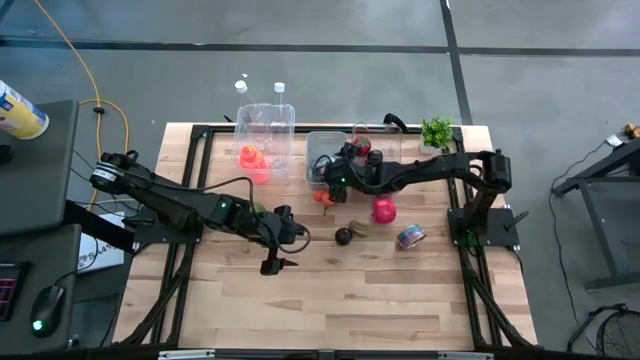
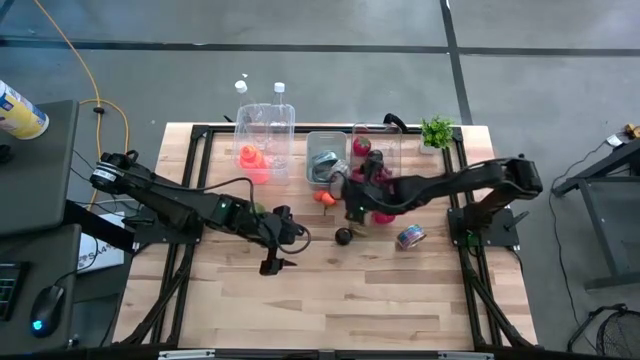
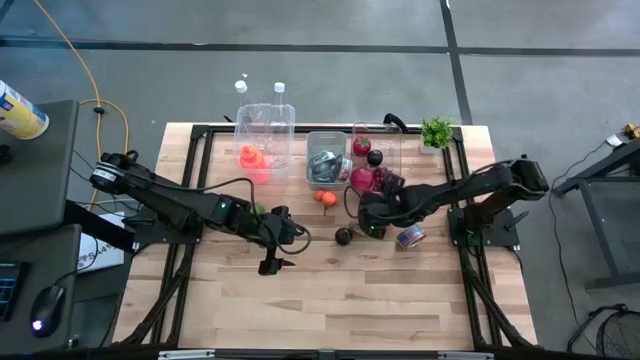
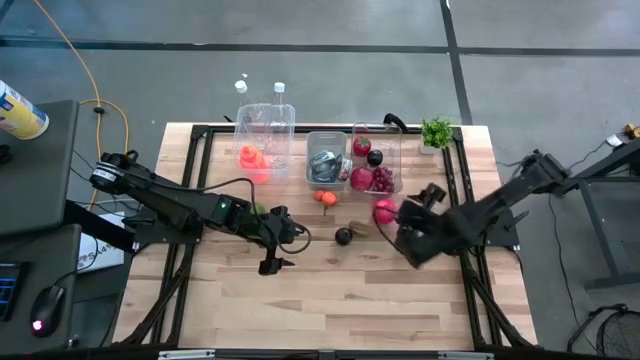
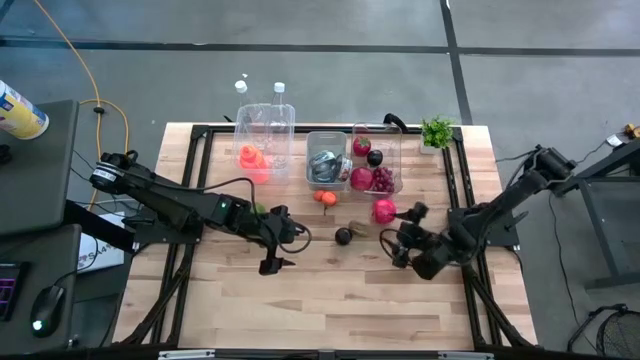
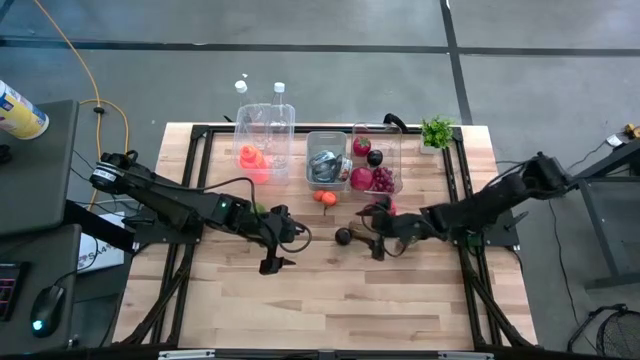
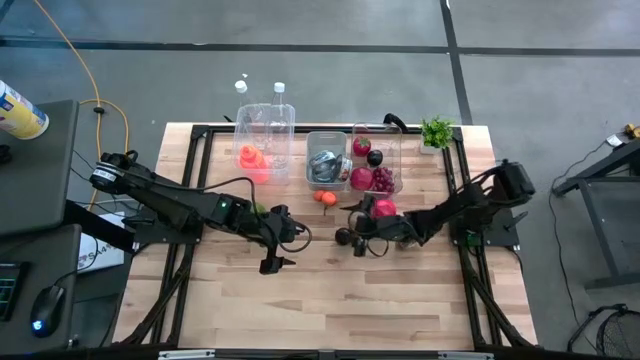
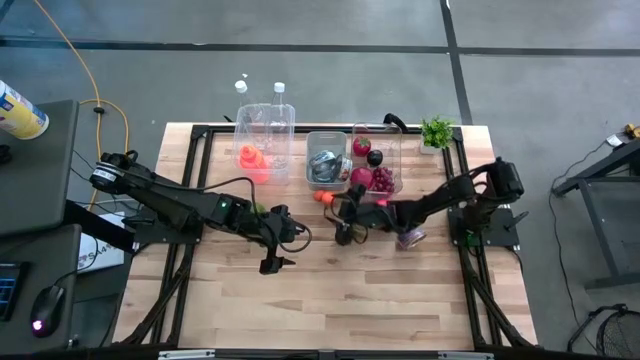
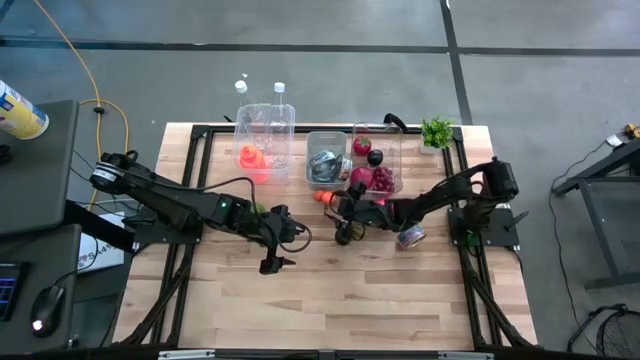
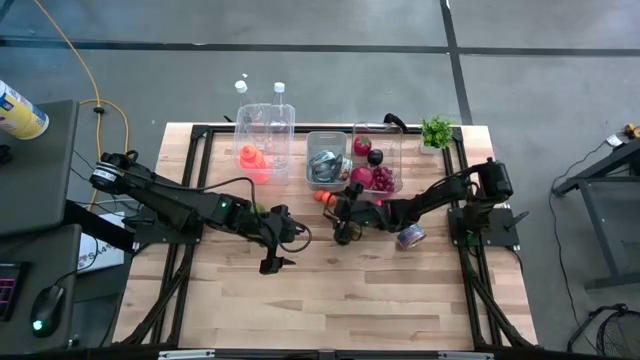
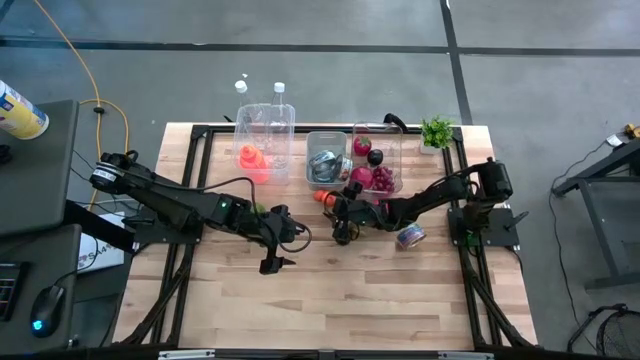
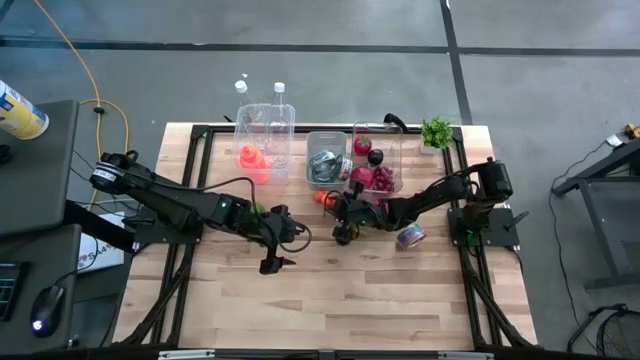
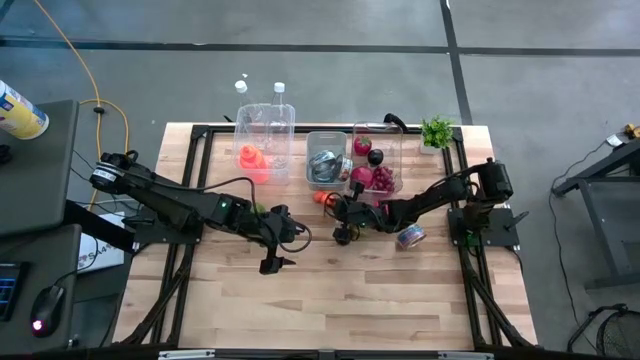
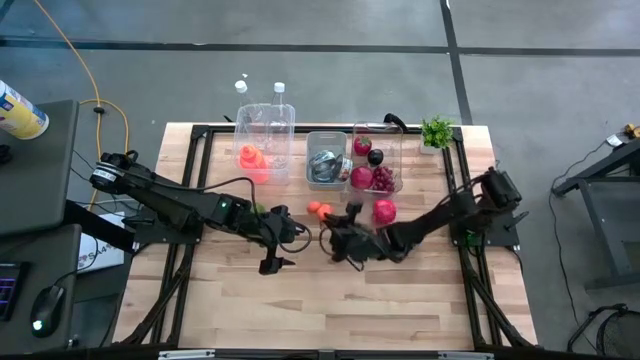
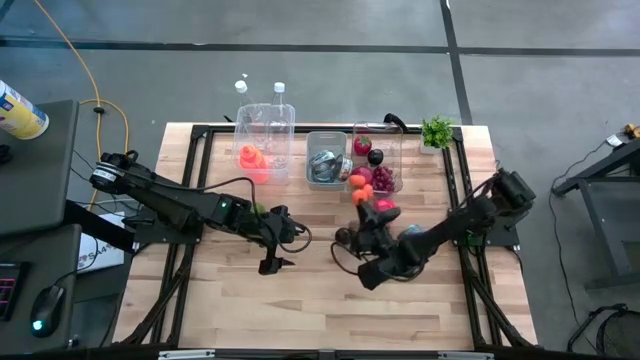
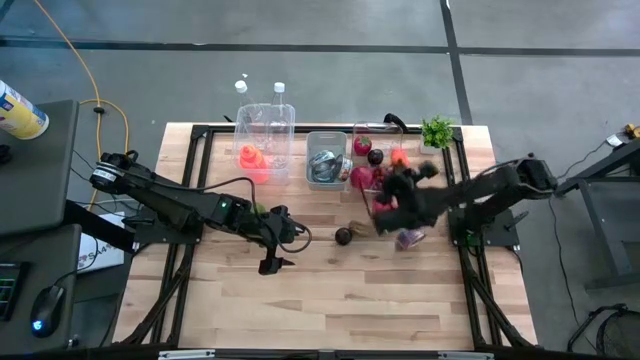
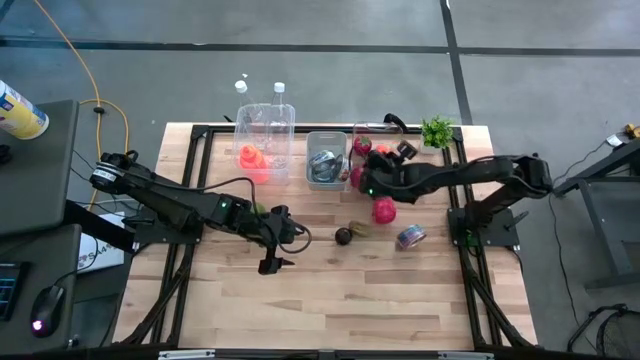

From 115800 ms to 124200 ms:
Task: Pick & Place Food Item
Put the tangerine into the transparent bin

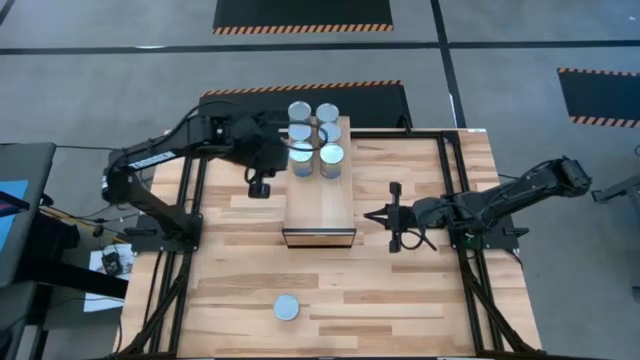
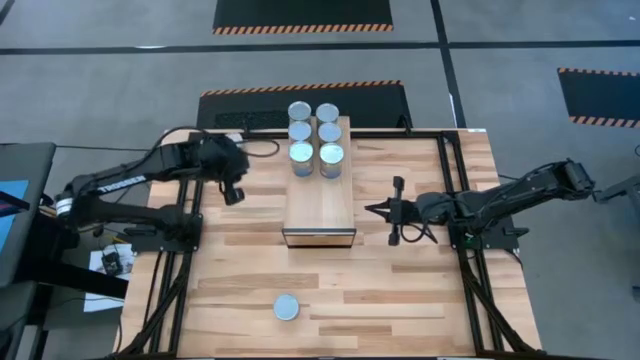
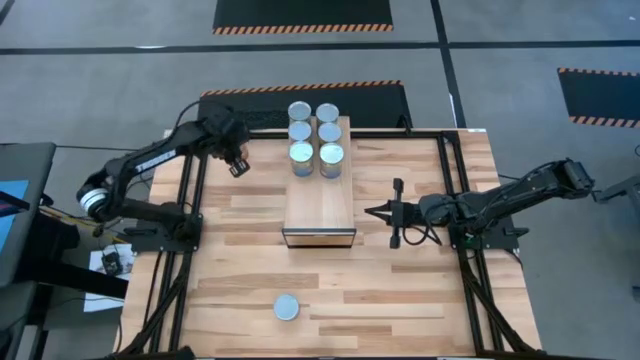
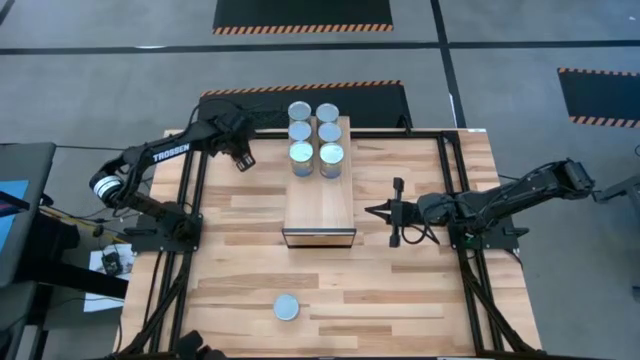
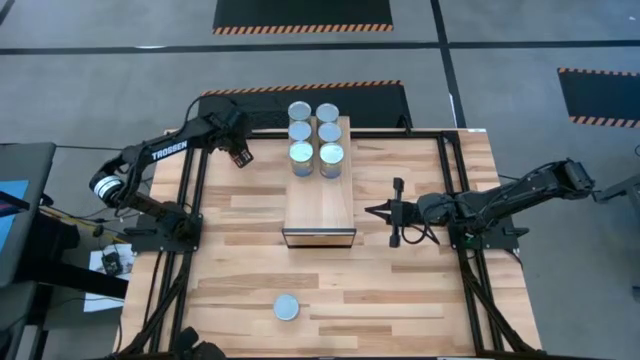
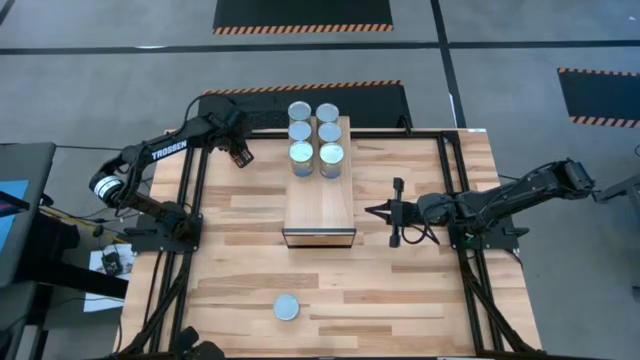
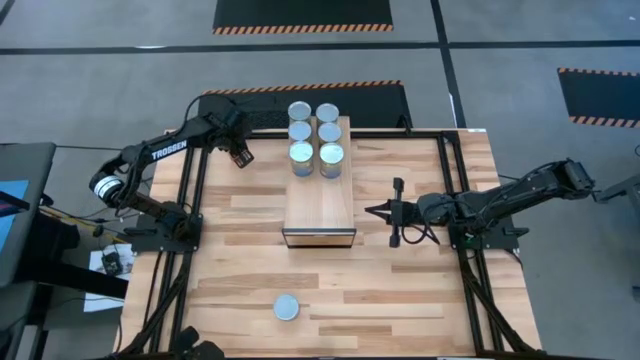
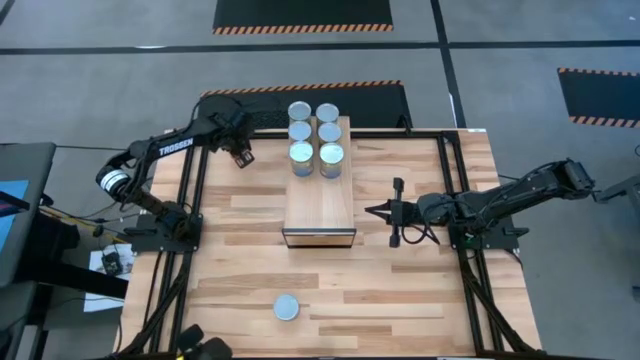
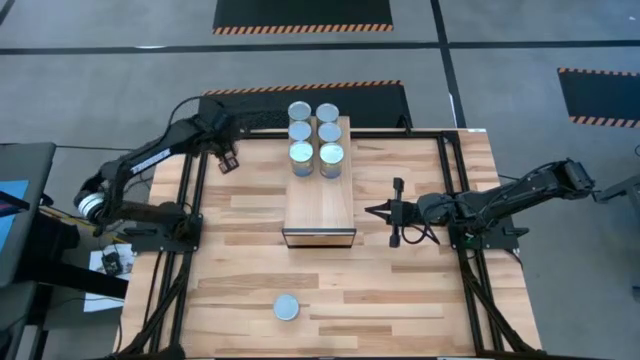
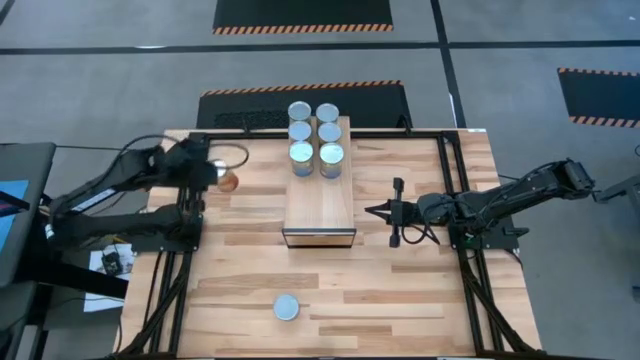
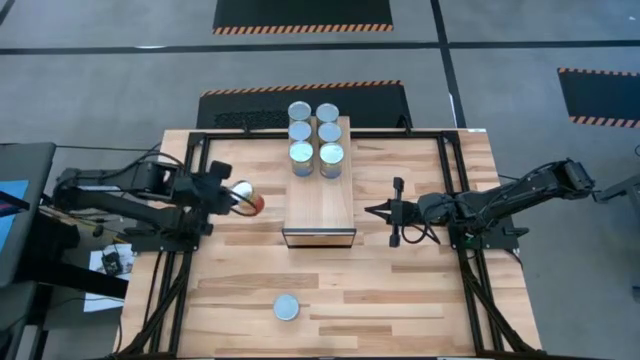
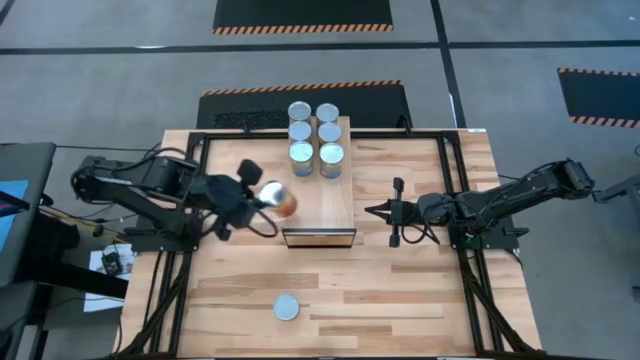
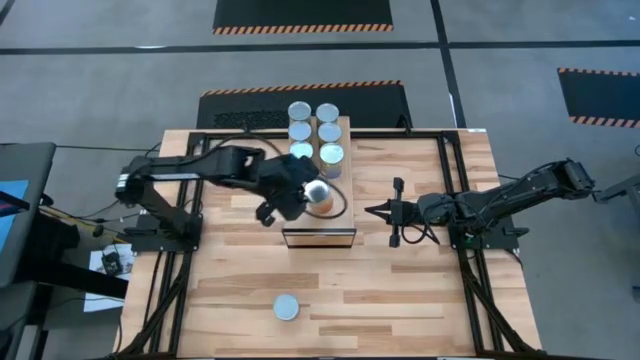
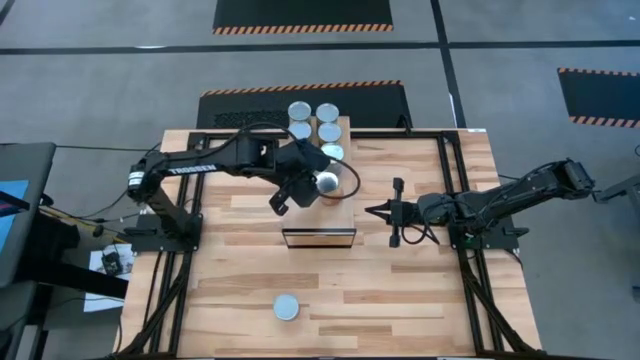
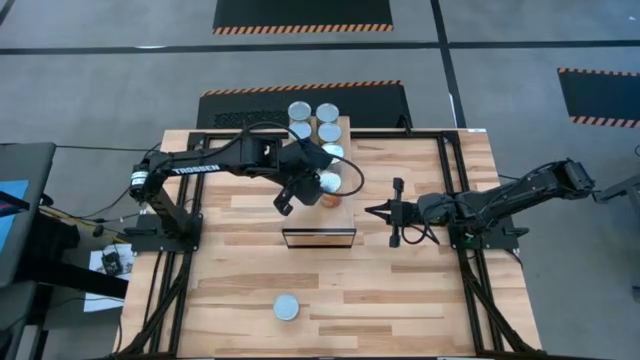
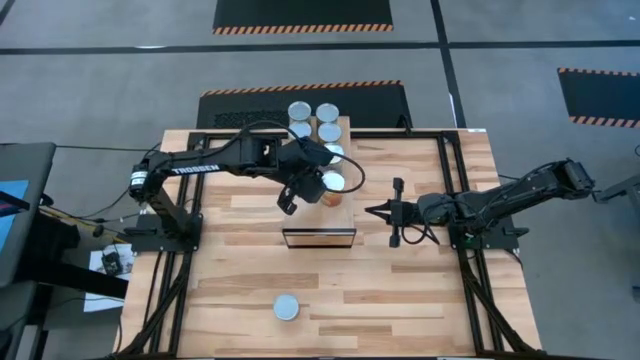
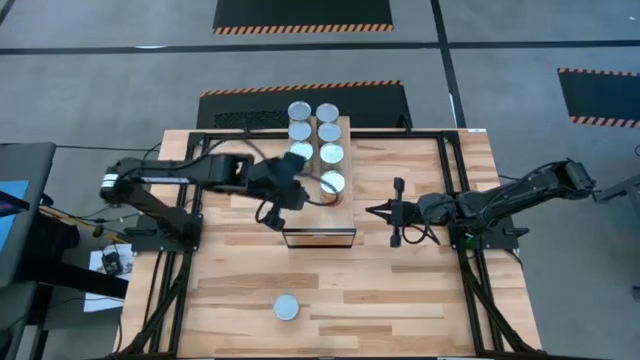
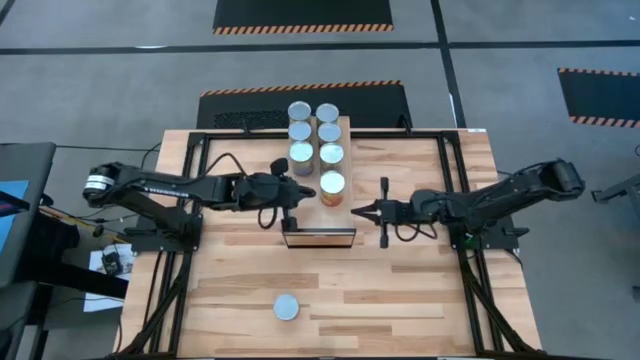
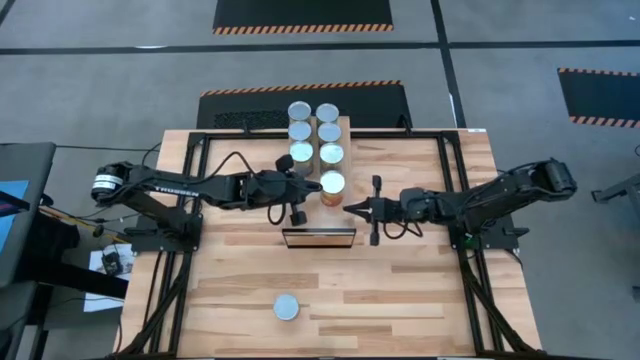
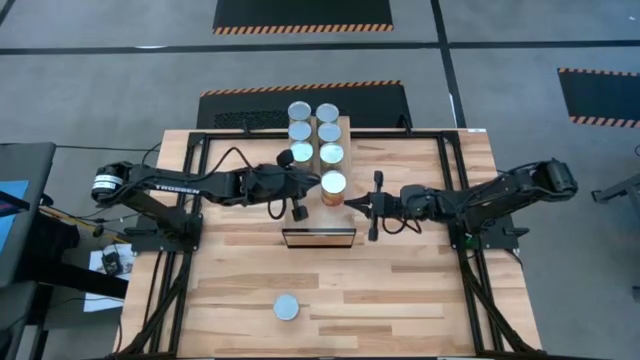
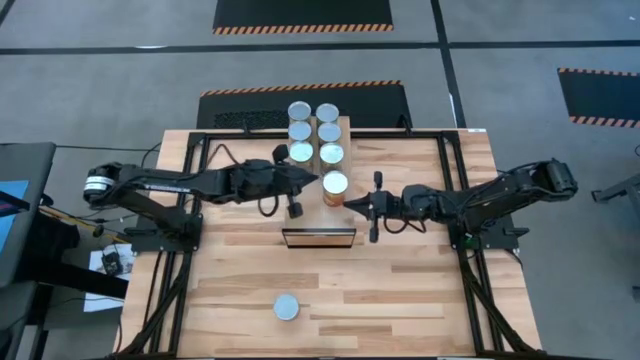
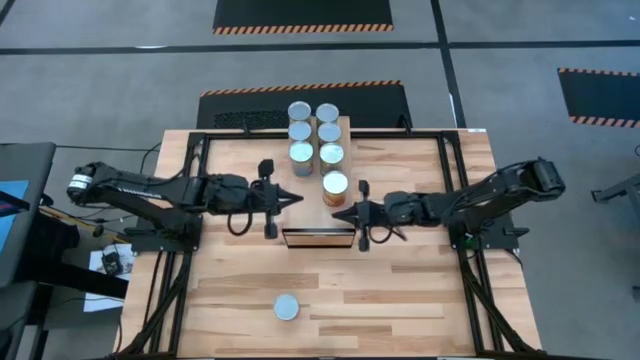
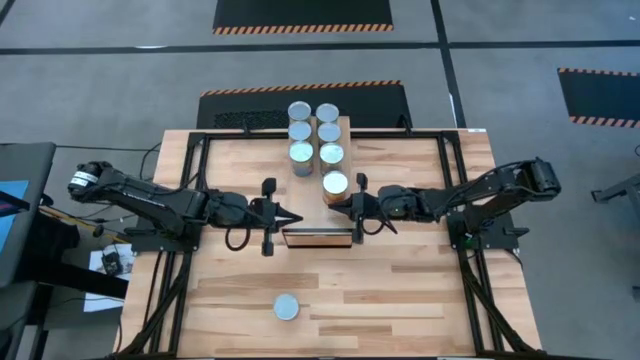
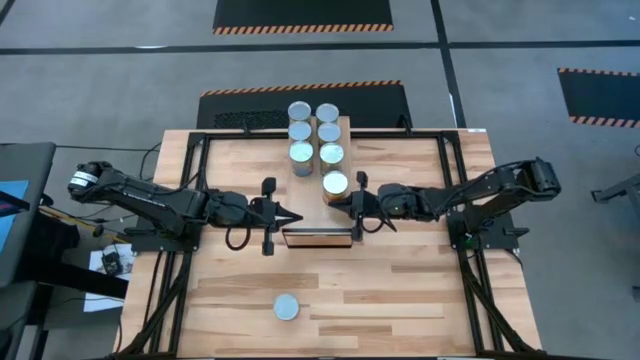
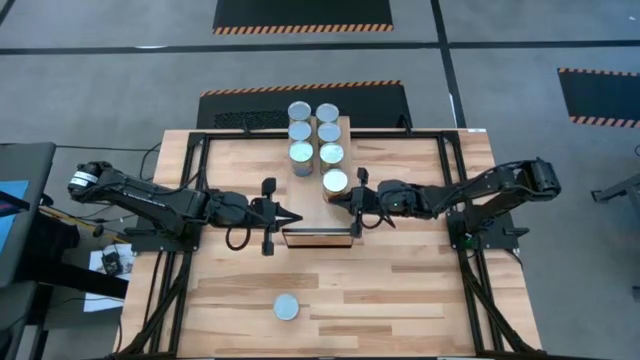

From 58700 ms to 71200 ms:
Task: Pick and place cans onto a shelf
Put the top canned corn on the shelf
